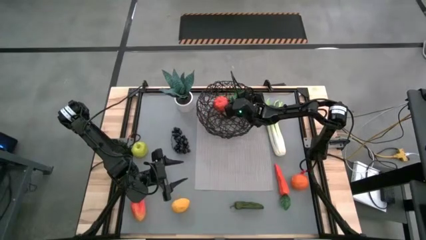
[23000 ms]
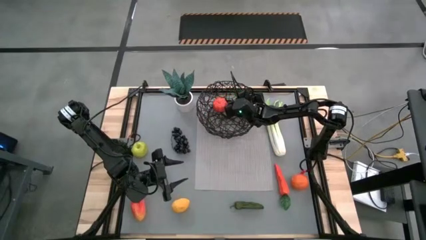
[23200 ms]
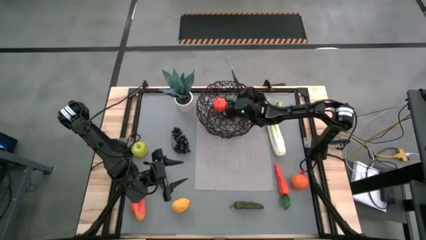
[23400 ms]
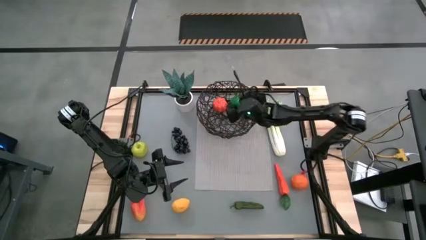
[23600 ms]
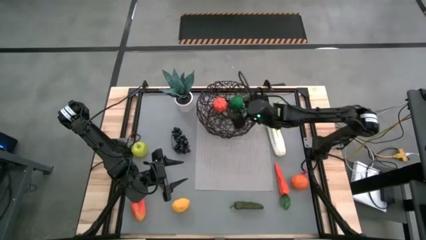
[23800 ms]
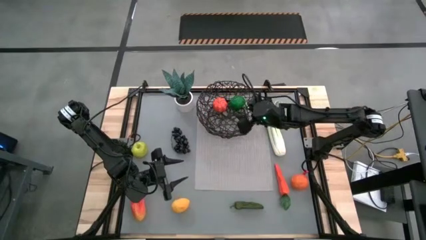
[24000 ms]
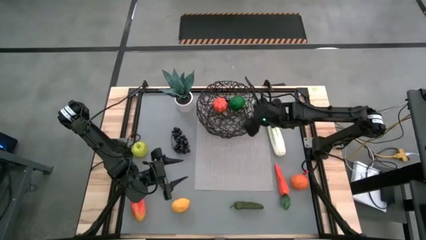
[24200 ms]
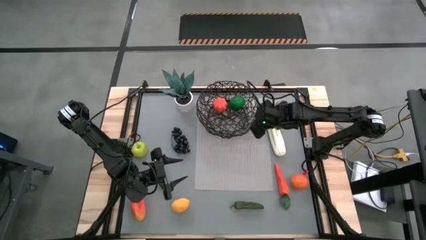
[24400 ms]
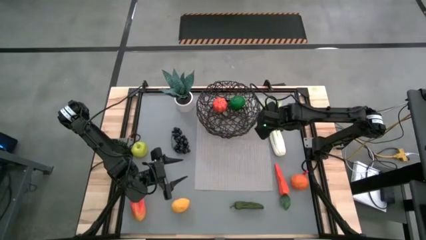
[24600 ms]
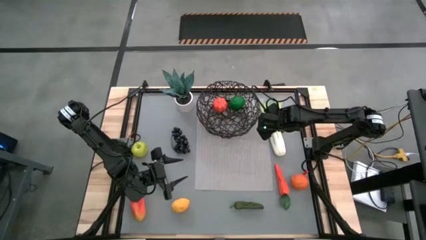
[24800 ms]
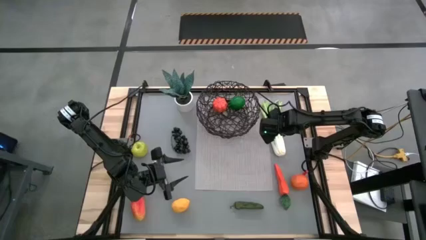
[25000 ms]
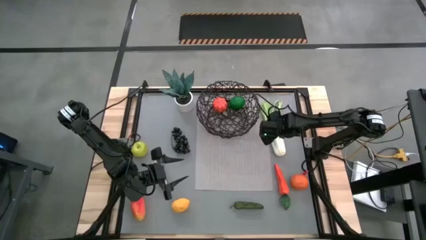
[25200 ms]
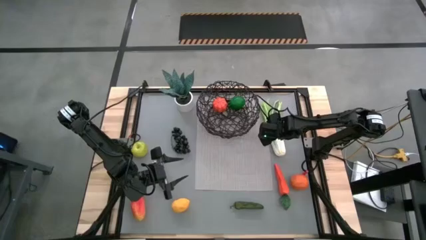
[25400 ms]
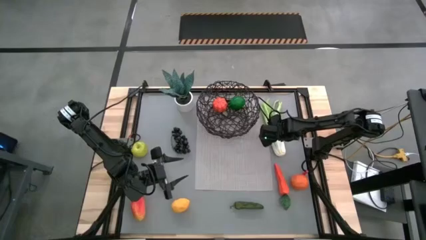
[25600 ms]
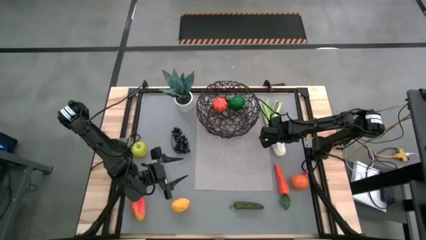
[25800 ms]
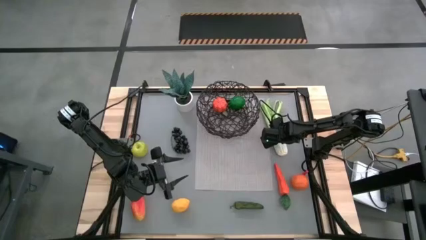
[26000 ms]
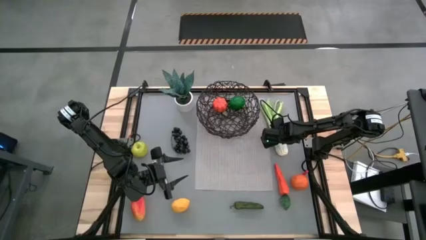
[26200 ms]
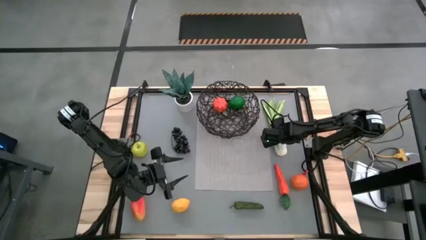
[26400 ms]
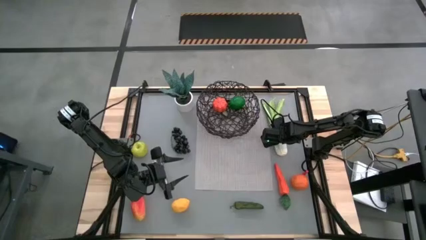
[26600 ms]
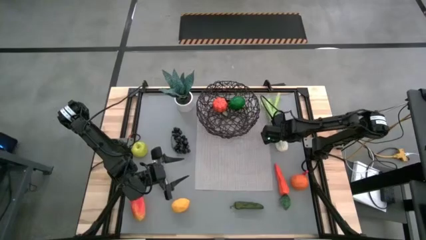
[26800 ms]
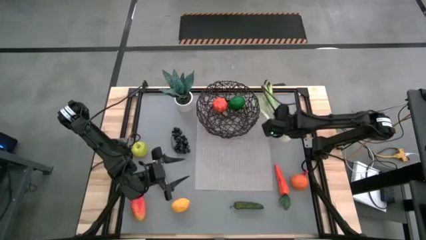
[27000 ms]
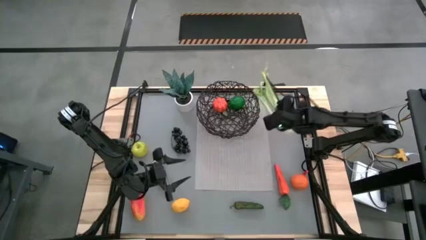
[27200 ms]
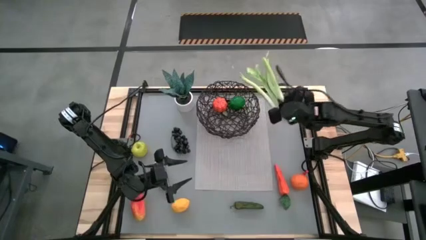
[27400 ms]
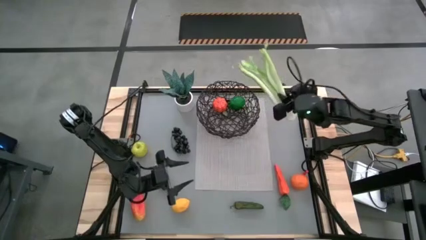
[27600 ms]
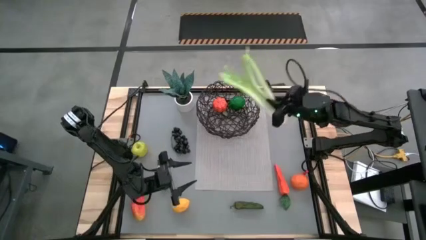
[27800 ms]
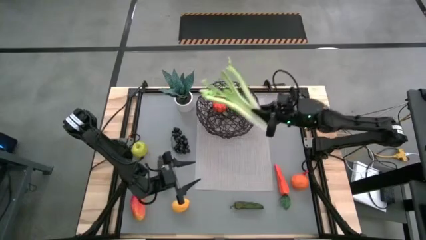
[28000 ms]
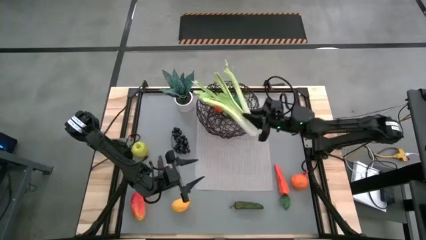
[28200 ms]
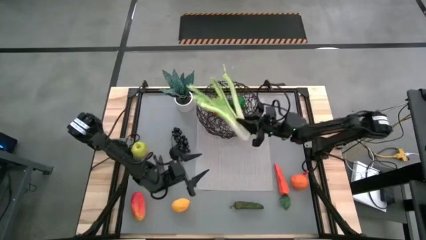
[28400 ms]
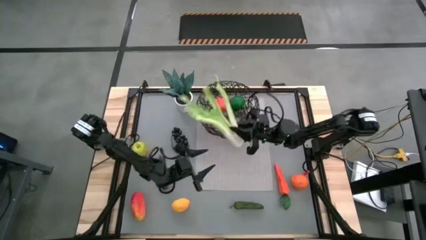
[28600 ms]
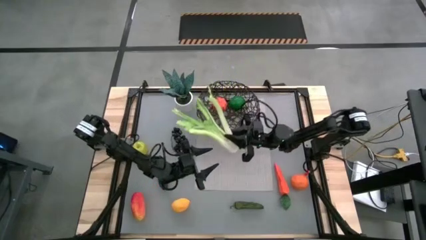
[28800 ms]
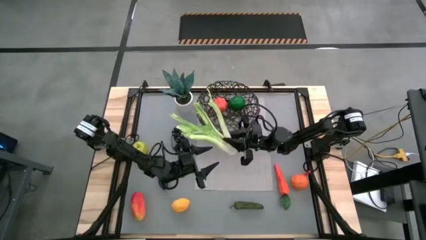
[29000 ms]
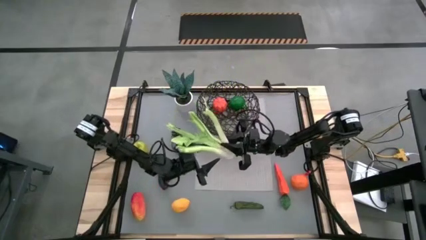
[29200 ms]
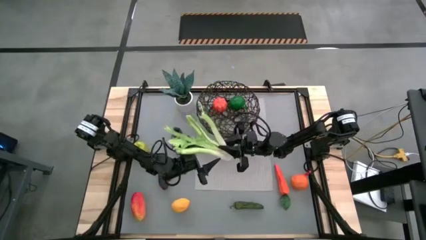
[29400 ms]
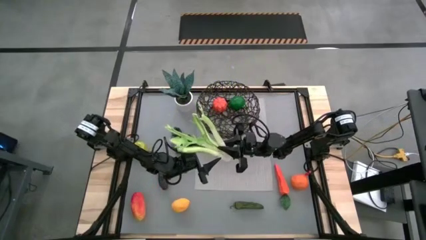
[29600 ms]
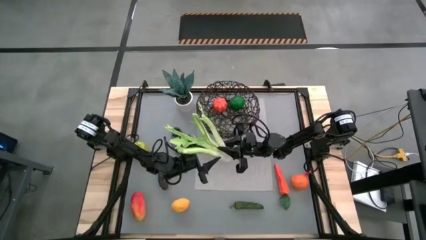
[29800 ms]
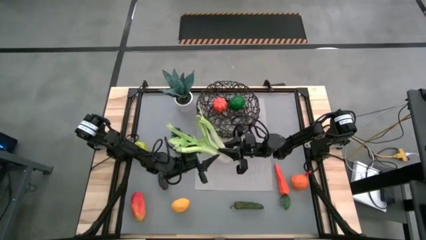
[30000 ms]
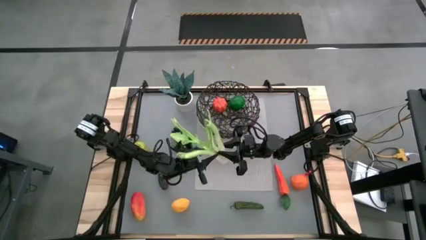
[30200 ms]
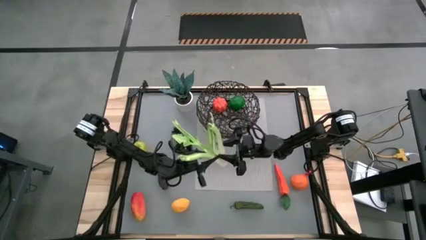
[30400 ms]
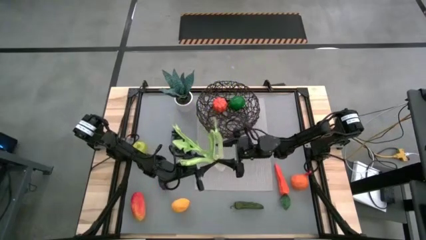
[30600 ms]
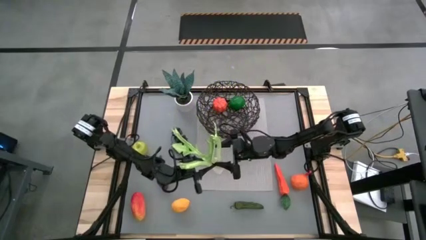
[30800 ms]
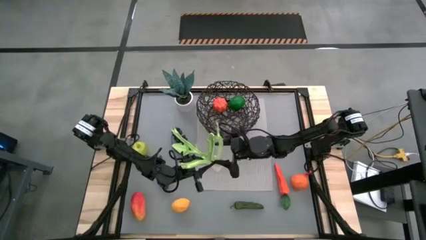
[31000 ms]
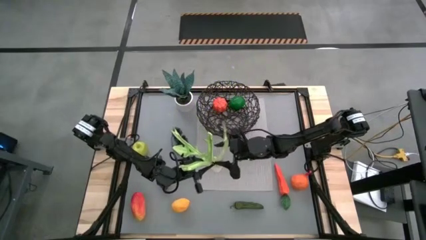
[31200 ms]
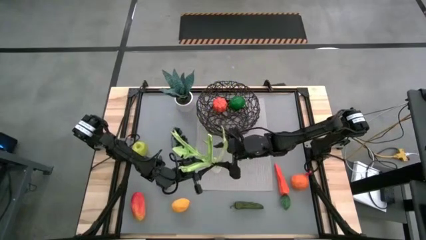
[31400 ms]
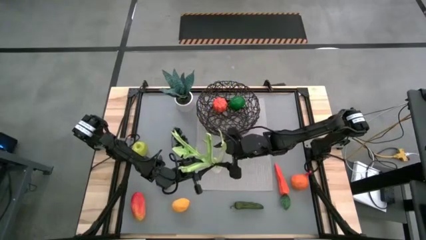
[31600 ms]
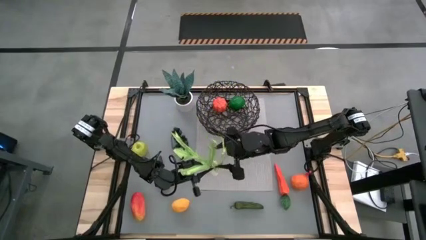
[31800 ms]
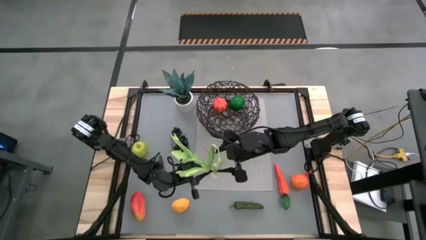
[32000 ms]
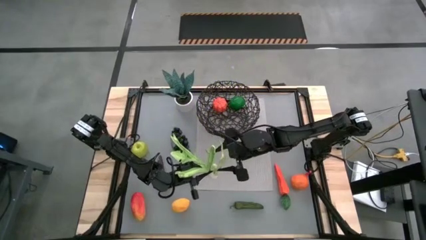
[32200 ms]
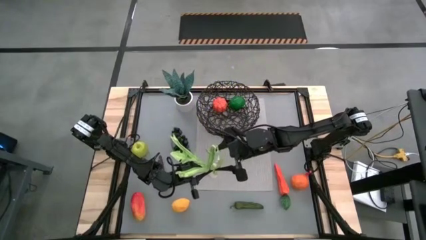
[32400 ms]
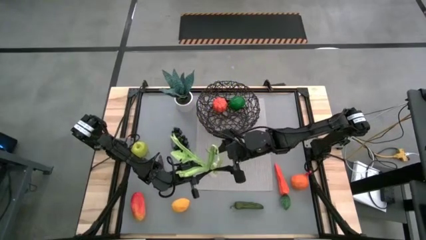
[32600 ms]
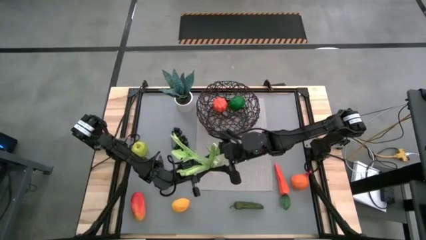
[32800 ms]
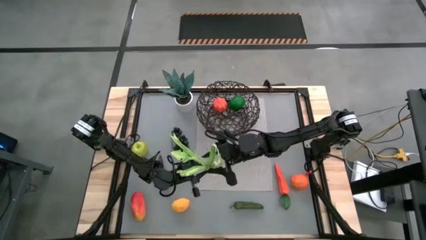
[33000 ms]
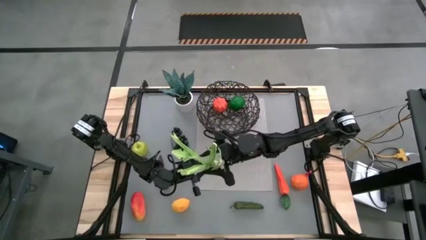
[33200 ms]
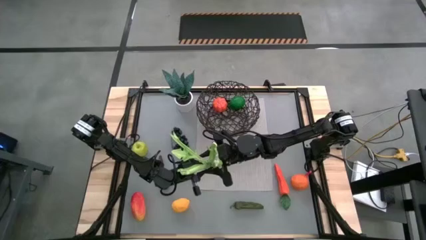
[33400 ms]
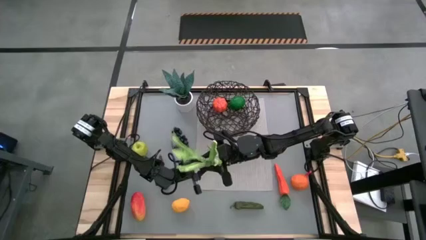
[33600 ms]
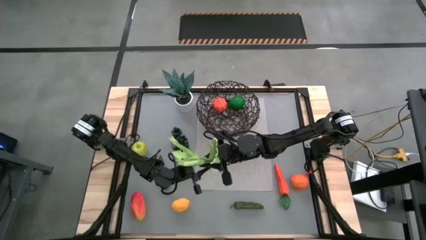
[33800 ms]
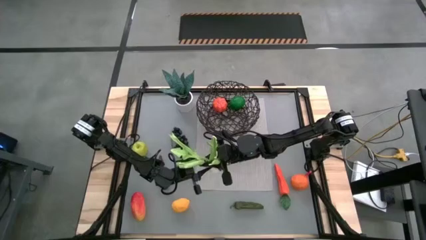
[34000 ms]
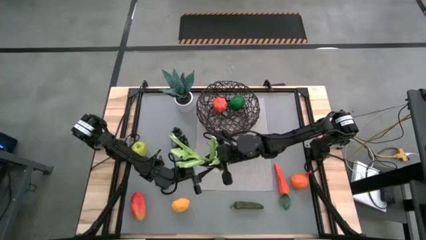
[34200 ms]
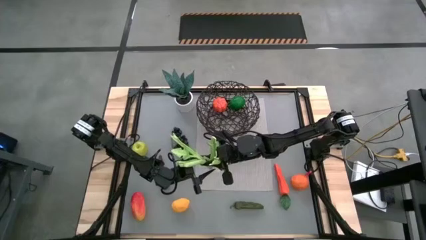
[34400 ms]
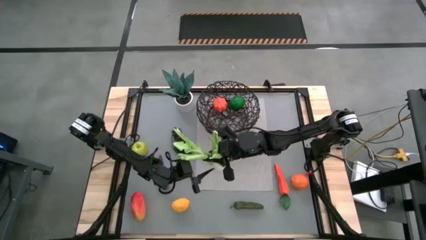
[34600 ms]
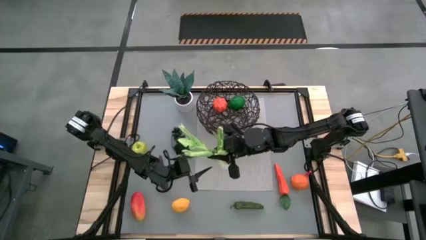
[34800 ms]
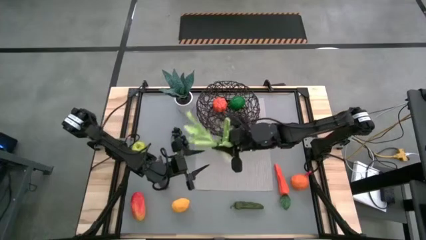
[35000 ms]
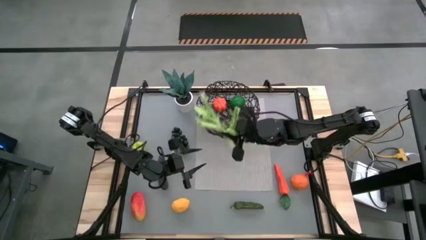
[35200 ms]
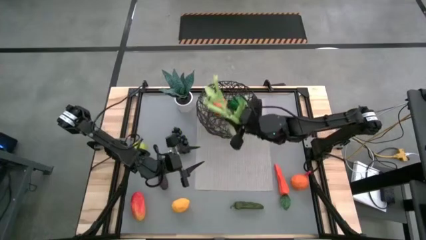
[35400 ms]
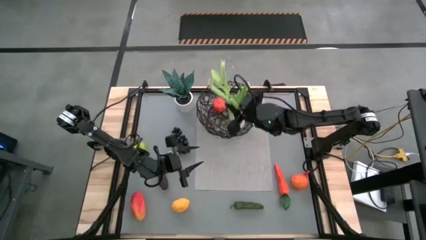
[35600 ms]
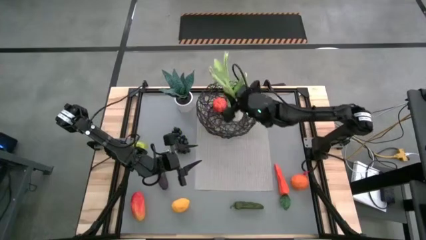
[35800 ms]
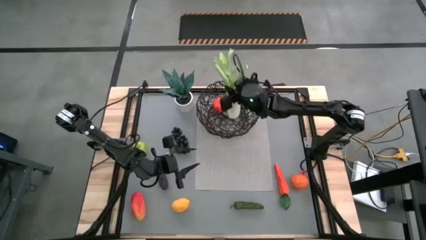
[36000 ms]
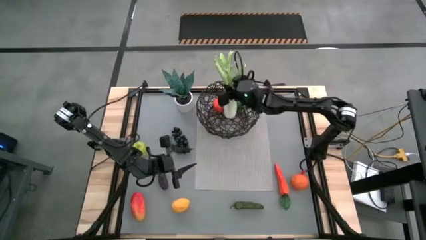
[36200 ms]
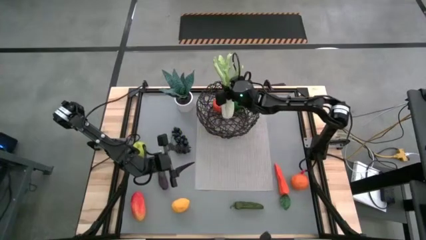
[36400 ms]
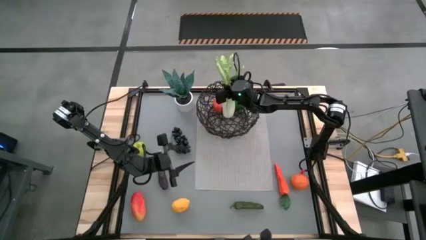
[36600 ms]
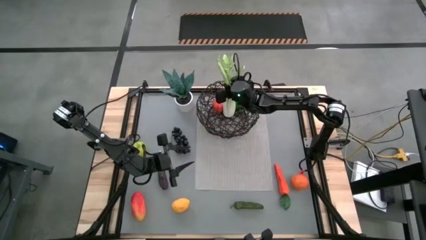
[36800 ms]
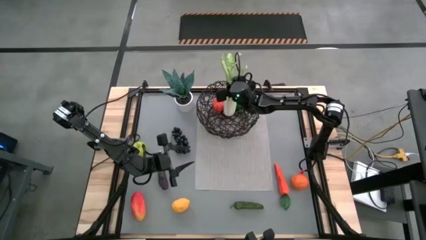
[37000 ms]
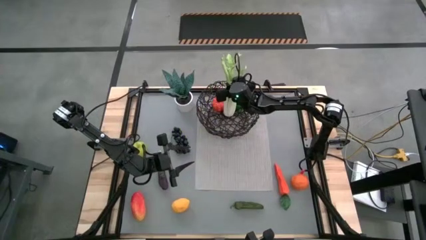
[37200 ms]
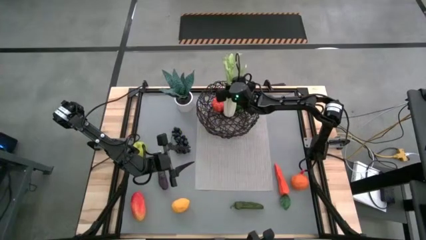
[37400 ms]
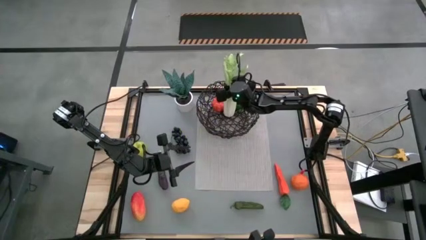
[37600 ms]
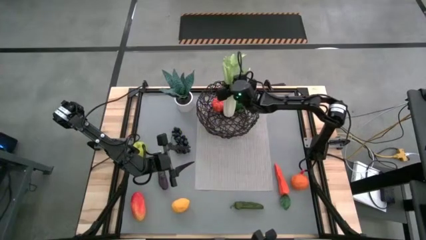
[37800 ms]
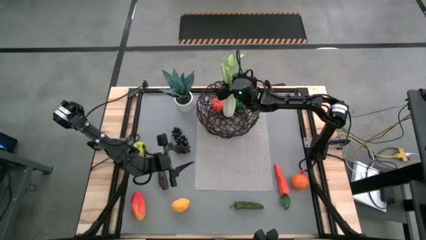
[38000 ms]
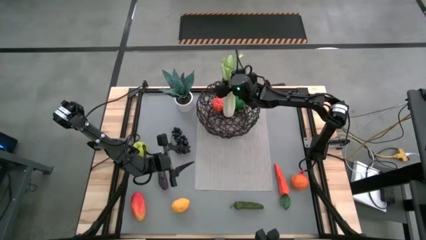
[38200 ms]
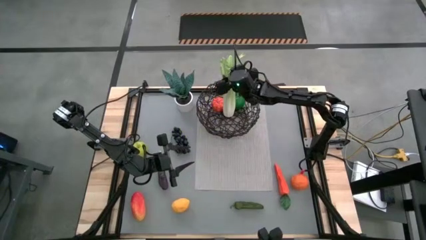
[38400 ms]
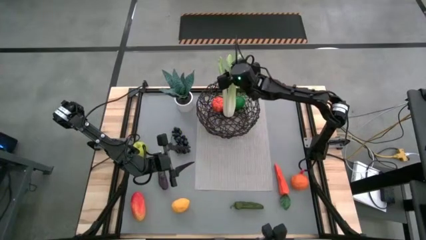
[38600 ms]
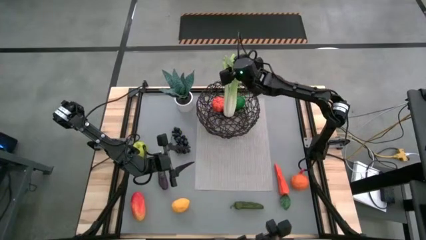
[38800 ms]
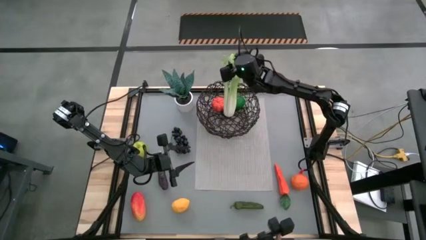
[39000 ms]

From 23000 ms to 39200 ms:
Task: Build produce basket
Put the green celery into the black wire basket
